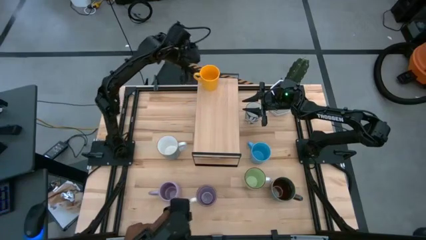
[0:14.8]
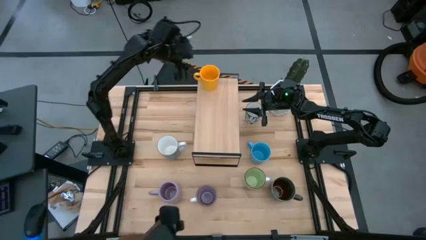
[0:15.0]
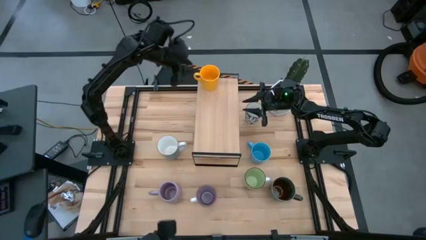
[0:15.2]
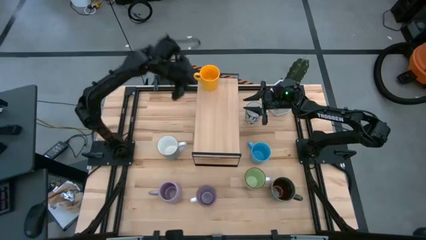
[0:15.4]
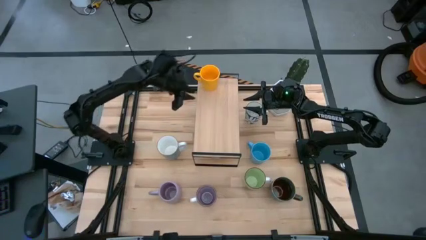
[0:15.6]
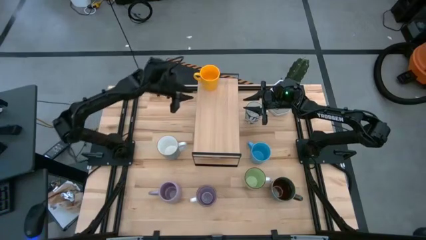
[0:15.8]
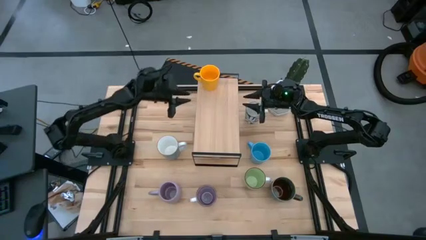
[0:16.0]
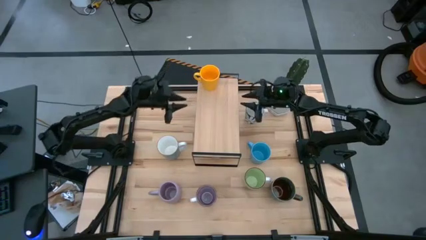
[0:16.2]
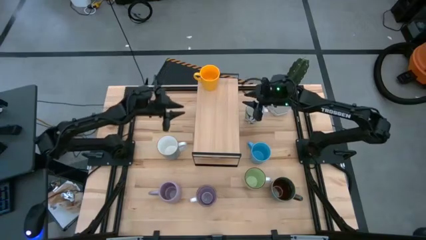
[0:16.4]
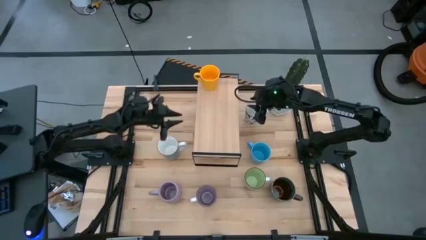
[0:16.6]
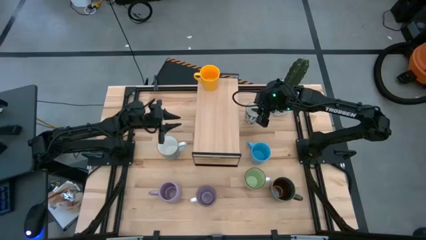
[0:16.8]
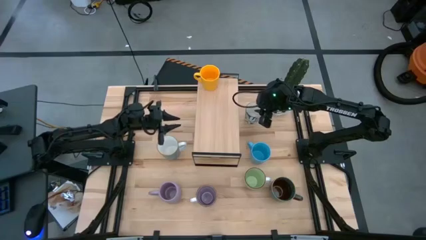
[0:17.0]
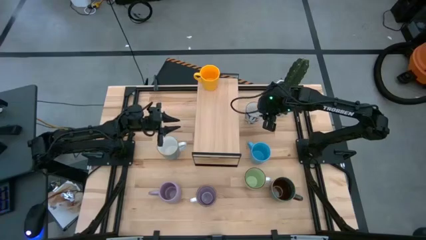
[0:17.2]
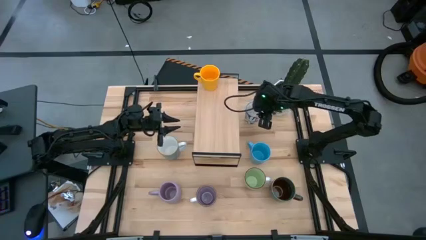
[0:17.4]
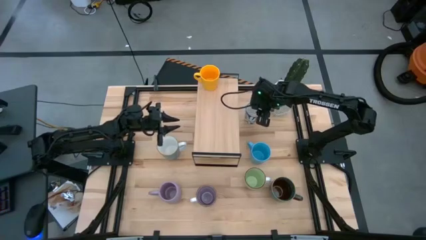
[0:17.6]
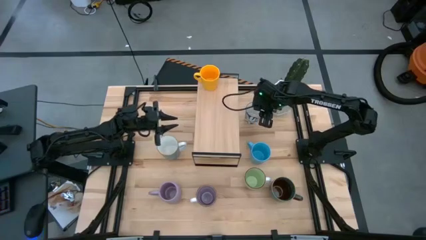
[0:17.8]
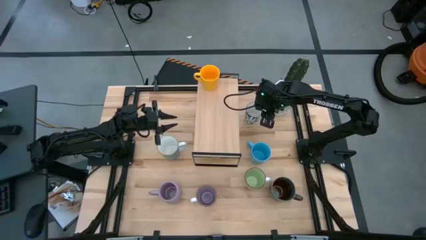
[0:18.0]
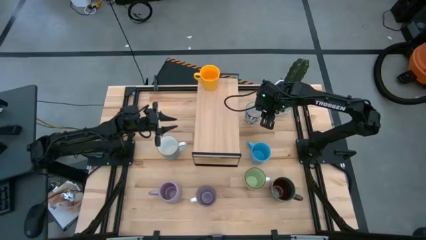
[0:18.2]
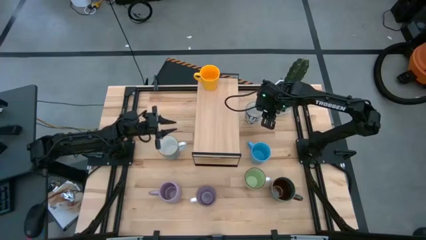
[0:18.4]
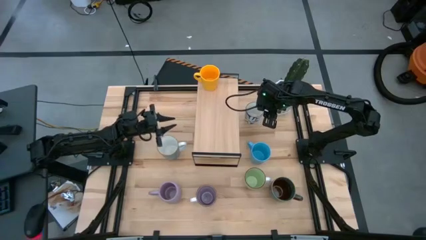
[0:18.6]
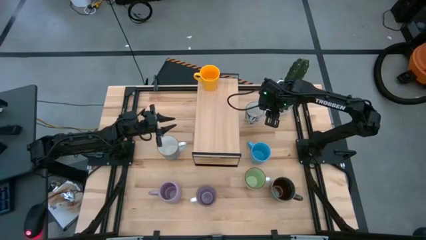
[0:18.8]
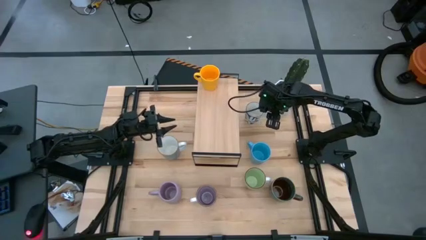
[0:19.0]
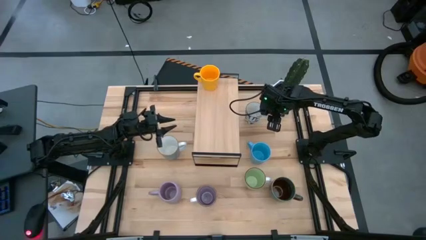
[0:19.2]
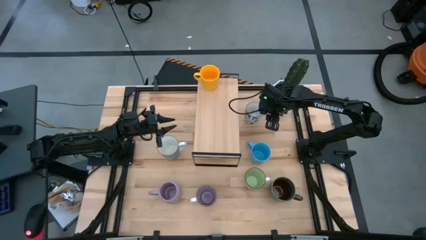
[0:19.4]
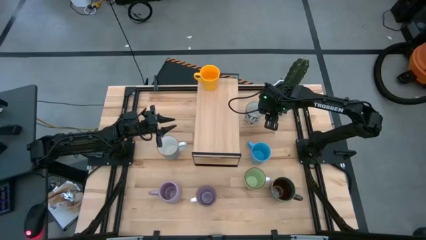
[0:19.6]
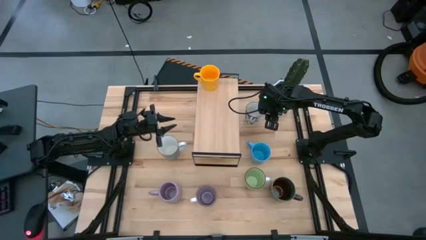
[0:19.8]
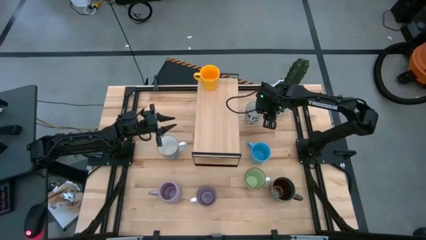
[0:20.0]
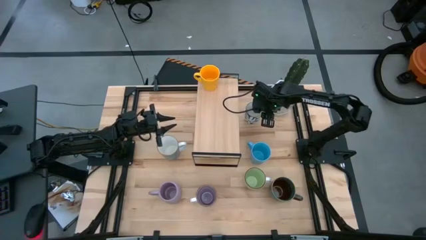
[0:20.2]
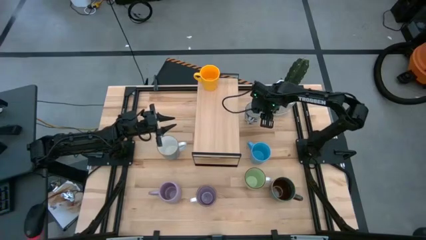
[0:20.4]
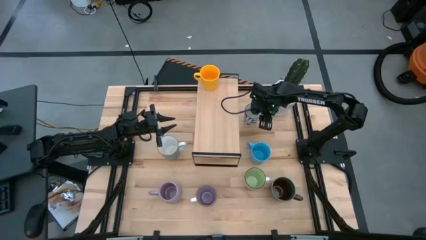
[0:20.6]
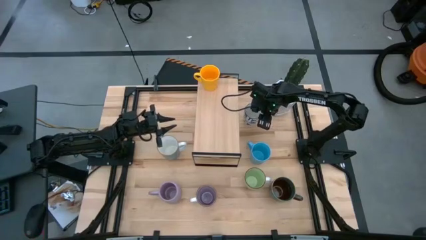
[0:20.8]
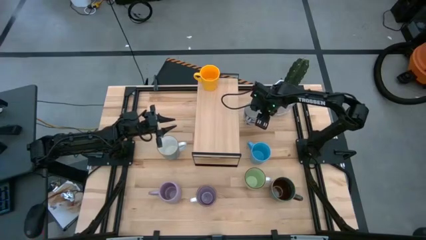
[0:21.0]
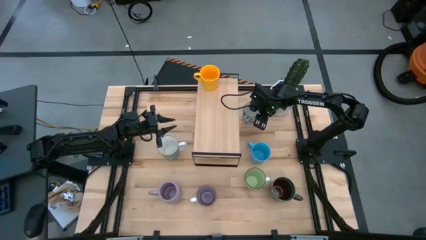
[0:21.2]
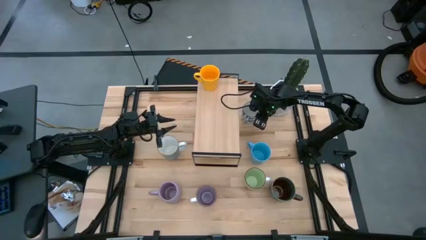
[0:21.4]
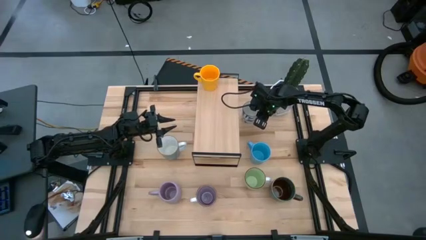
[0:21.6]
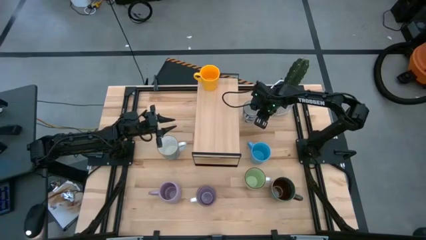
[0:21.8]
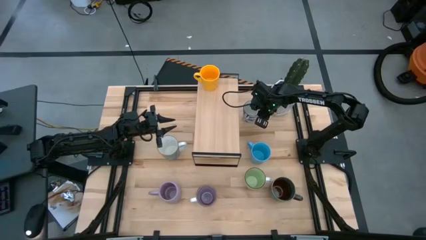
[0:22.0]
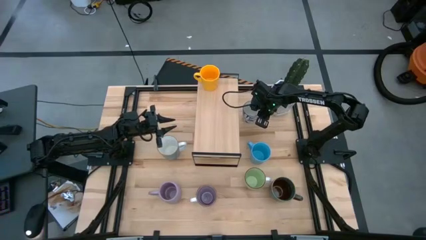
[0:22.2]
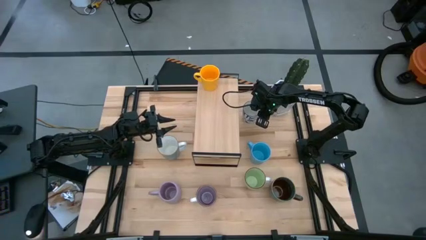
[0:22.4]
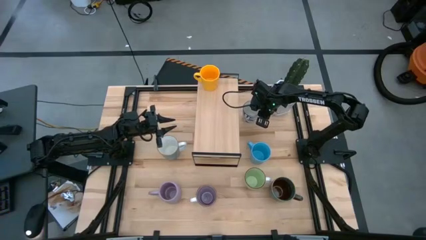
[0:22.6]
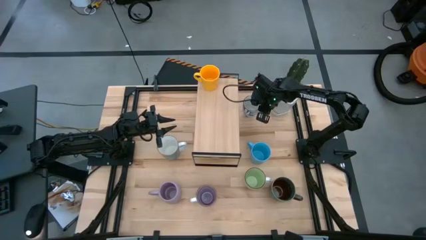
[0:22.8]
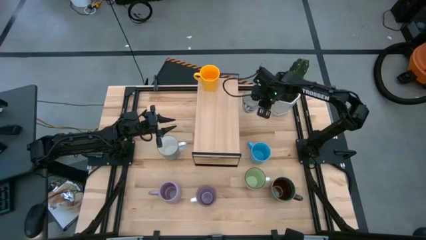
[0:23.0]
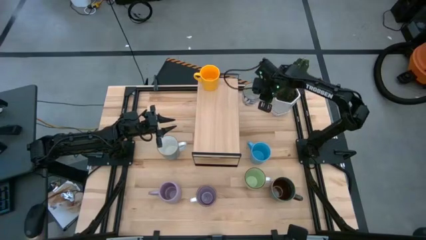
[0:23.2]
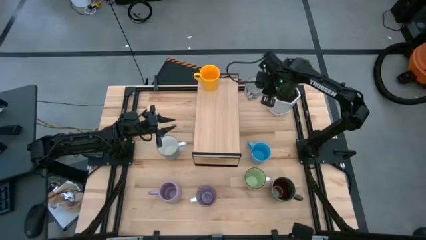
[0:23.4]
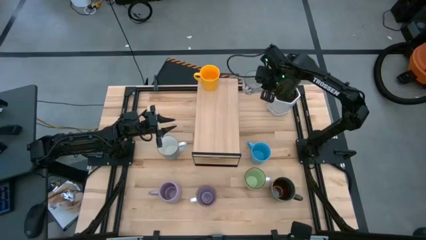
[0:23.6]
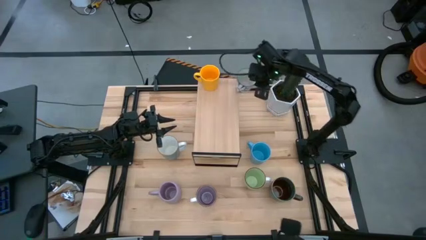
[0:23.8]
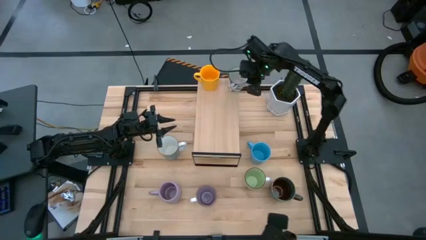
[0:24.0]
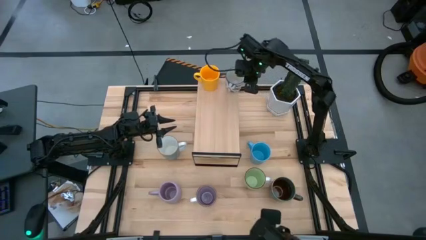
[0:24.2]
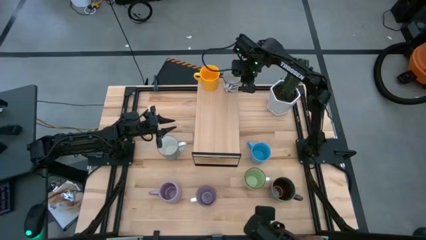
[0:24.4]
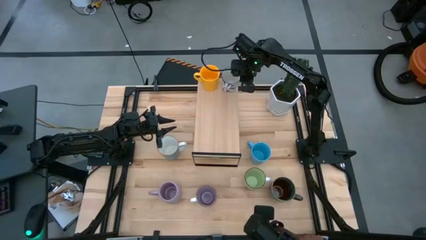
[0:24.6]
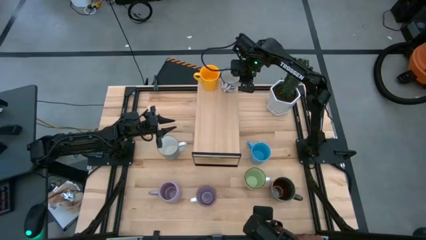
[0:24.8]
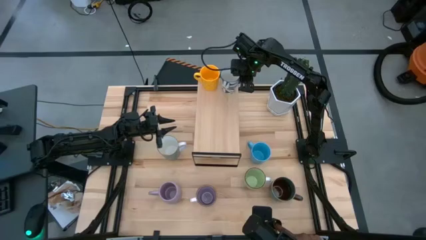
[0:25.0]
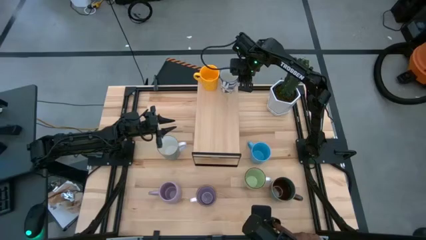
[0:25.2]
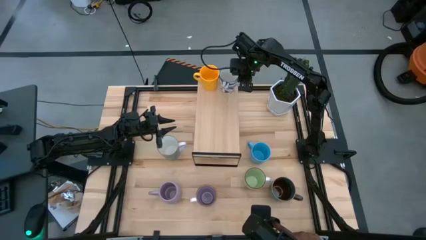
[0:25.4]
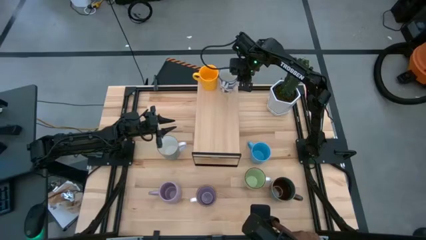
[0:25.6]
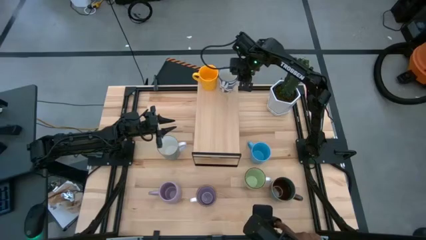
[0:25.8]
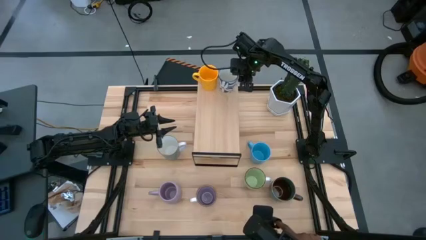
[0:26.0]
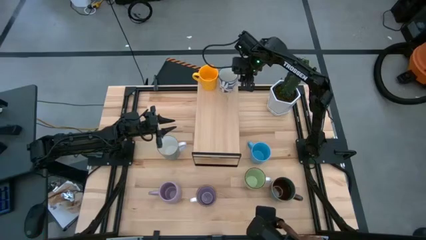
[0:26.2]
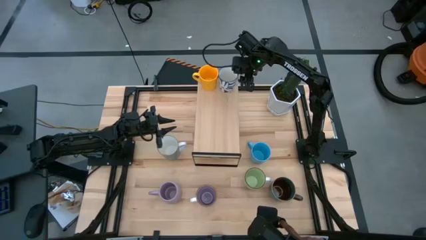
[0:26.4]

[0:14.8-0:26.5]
Task: Place coffee mugs
Put the blue mug on the shelf
